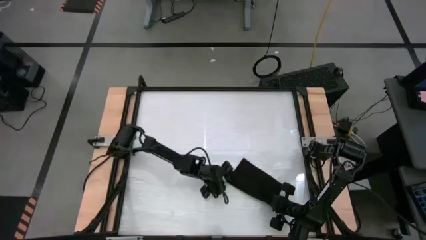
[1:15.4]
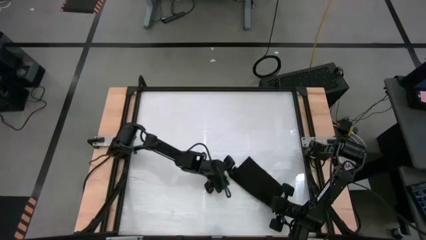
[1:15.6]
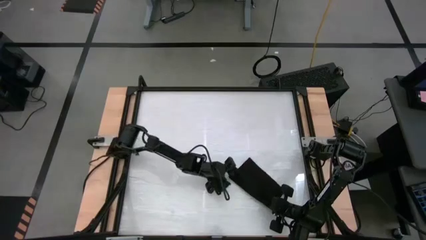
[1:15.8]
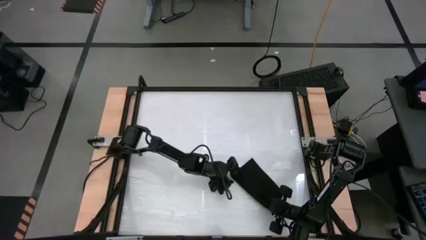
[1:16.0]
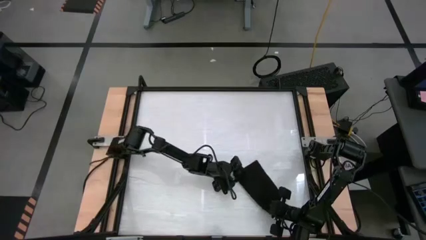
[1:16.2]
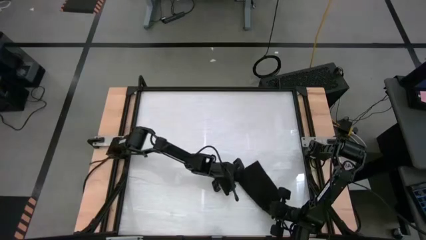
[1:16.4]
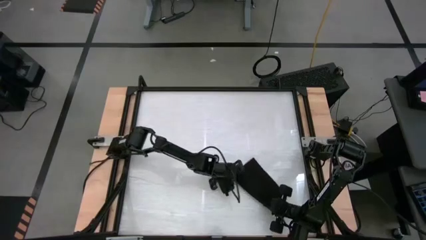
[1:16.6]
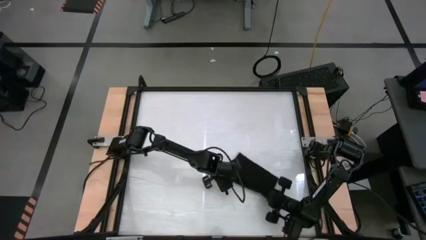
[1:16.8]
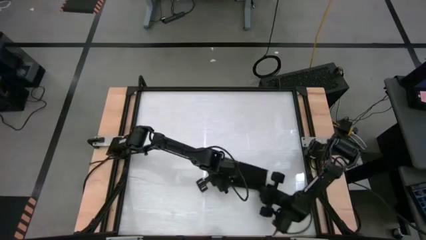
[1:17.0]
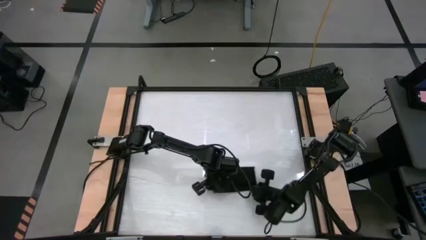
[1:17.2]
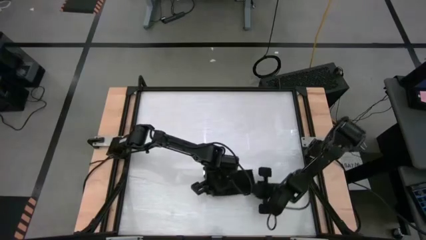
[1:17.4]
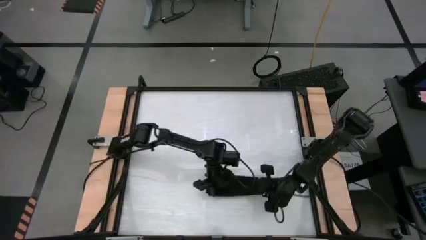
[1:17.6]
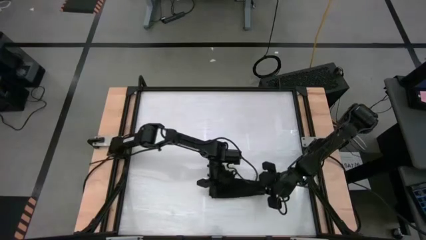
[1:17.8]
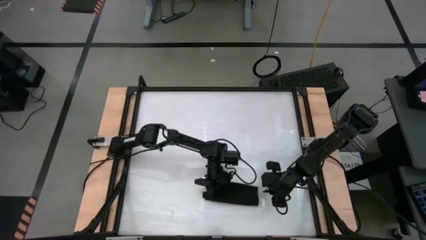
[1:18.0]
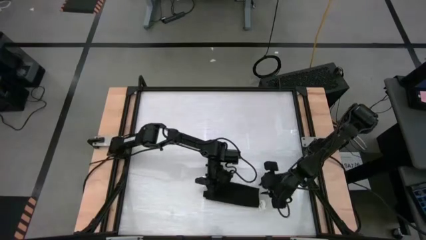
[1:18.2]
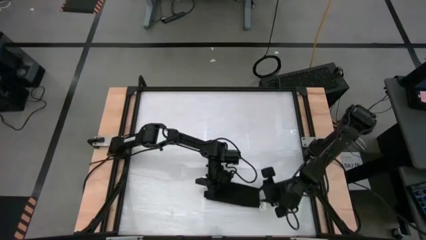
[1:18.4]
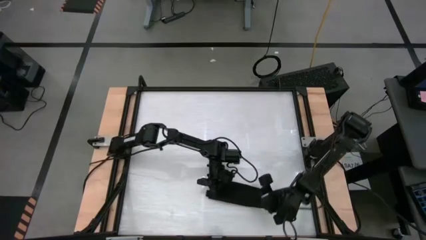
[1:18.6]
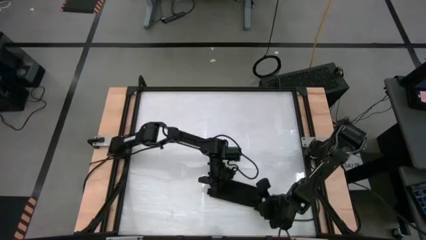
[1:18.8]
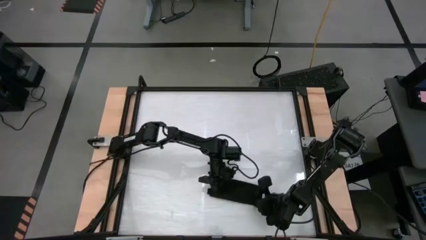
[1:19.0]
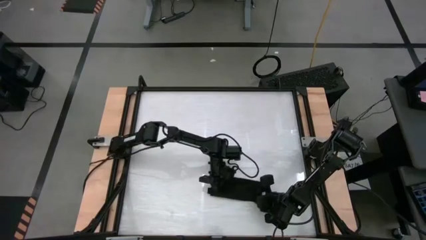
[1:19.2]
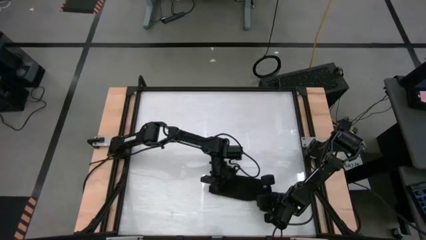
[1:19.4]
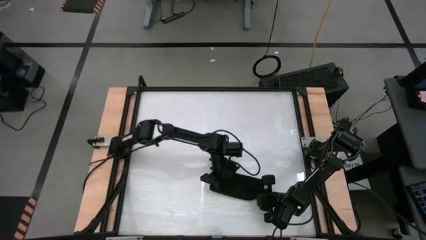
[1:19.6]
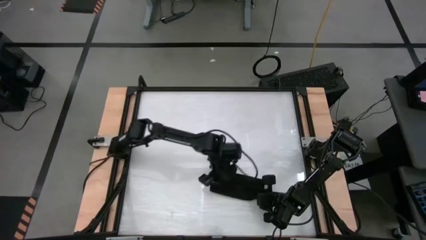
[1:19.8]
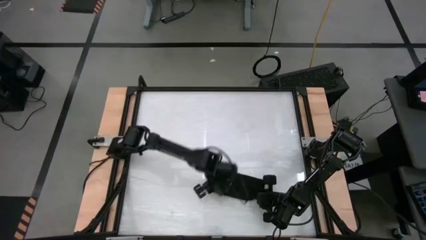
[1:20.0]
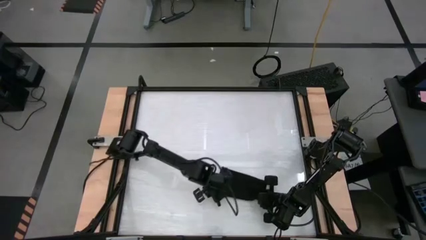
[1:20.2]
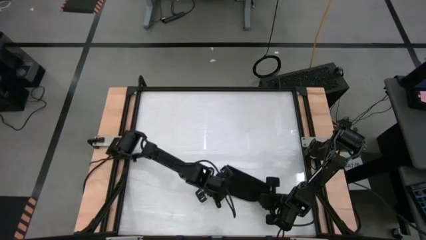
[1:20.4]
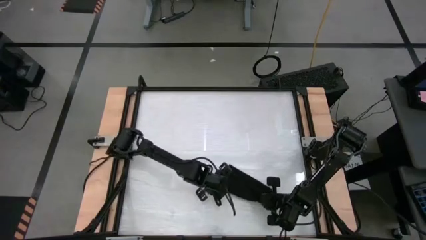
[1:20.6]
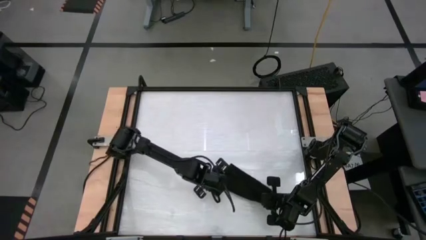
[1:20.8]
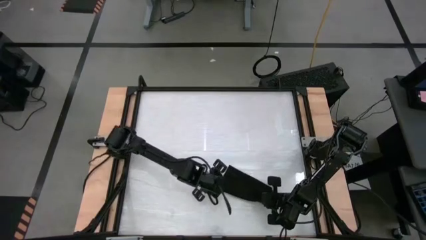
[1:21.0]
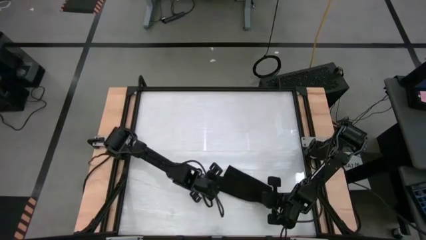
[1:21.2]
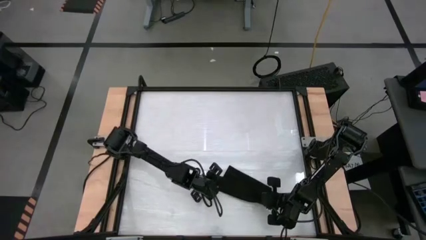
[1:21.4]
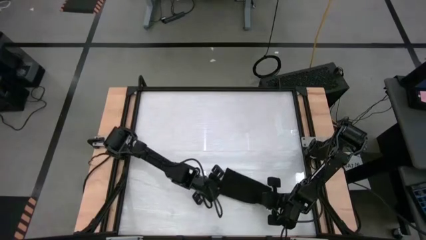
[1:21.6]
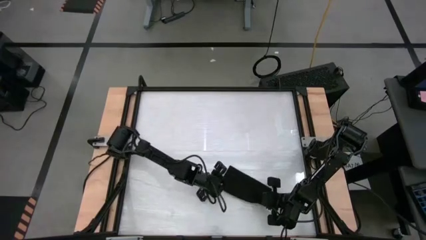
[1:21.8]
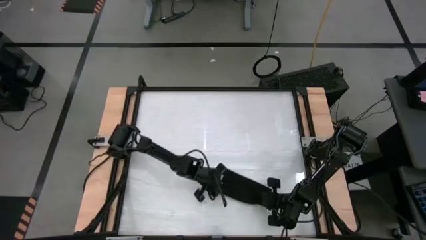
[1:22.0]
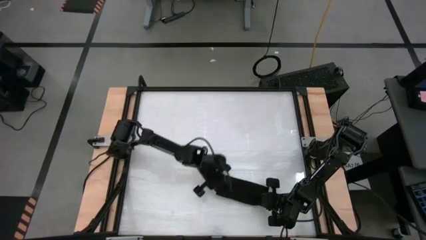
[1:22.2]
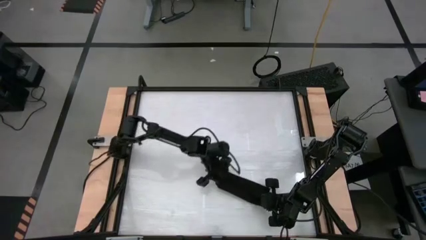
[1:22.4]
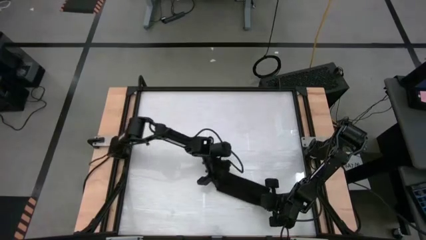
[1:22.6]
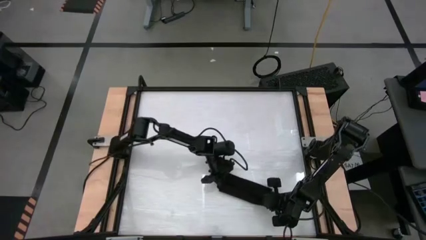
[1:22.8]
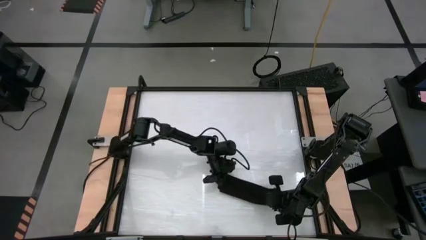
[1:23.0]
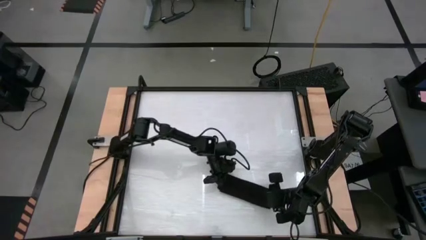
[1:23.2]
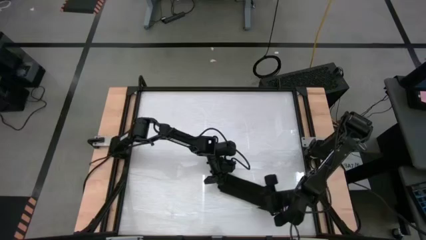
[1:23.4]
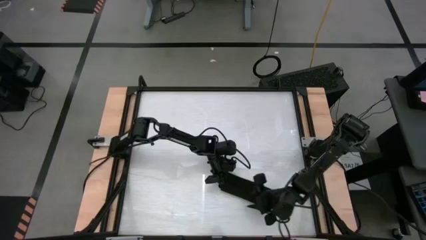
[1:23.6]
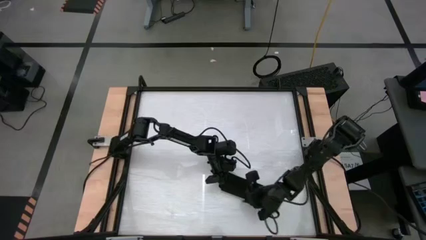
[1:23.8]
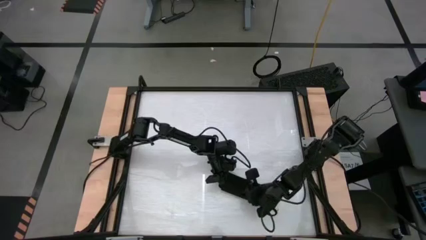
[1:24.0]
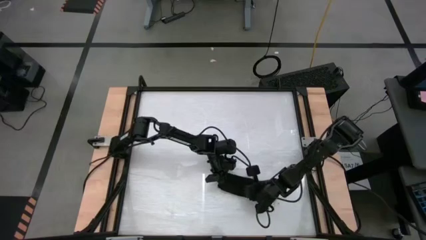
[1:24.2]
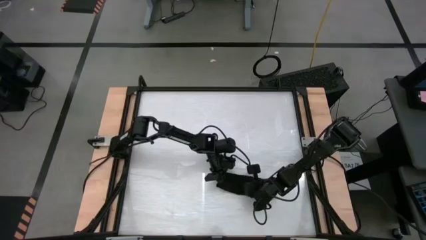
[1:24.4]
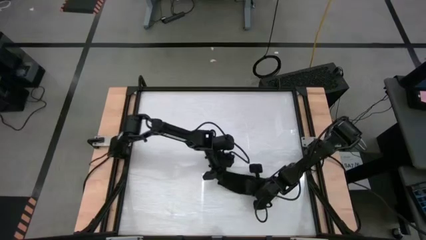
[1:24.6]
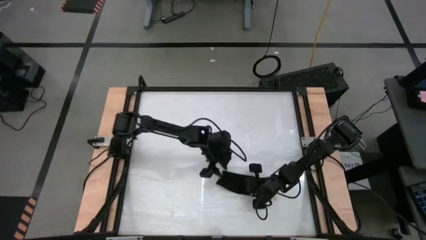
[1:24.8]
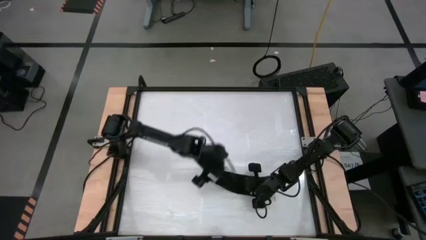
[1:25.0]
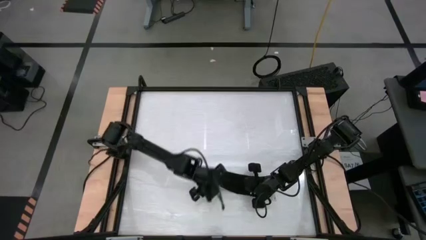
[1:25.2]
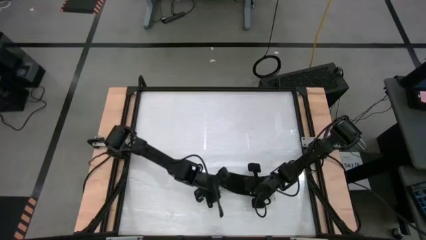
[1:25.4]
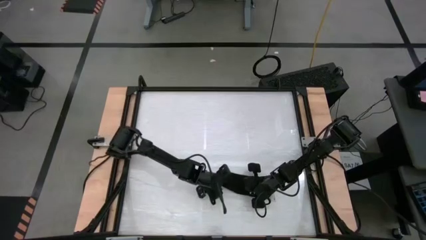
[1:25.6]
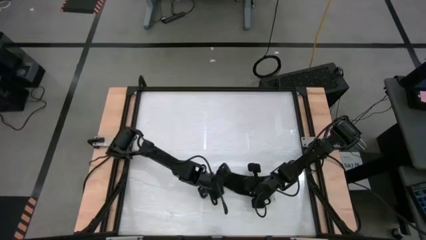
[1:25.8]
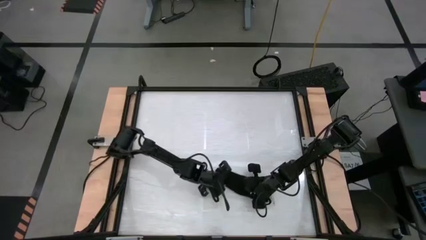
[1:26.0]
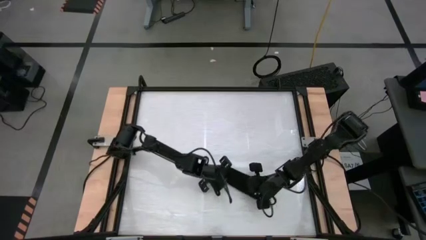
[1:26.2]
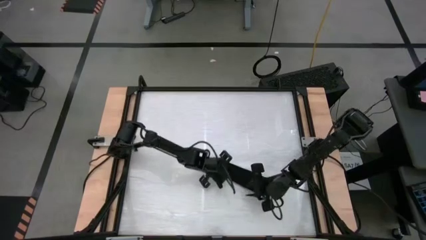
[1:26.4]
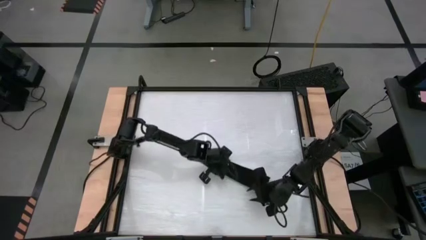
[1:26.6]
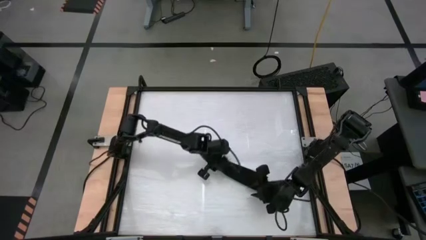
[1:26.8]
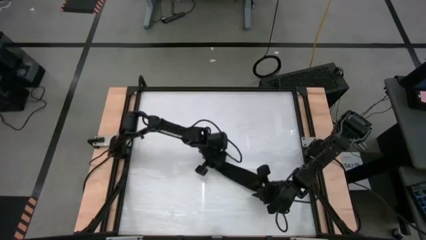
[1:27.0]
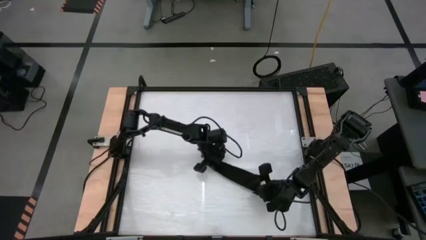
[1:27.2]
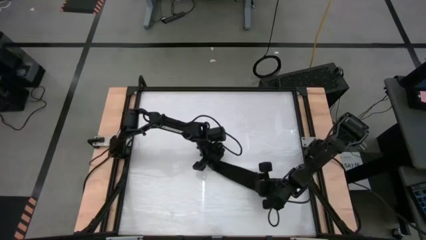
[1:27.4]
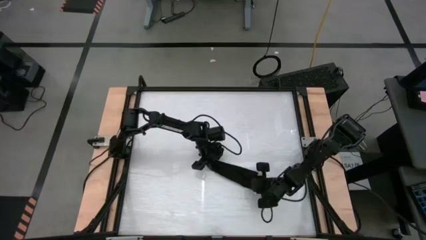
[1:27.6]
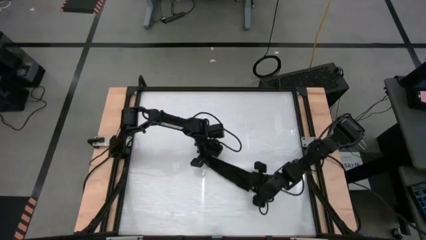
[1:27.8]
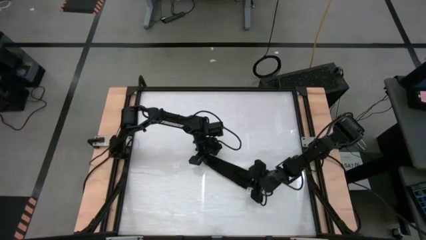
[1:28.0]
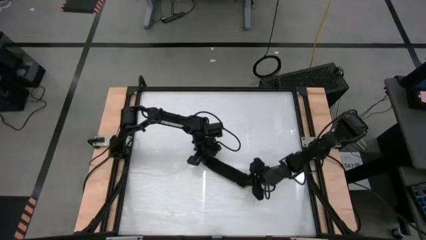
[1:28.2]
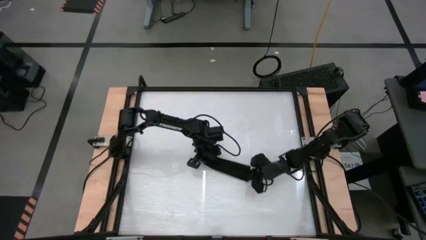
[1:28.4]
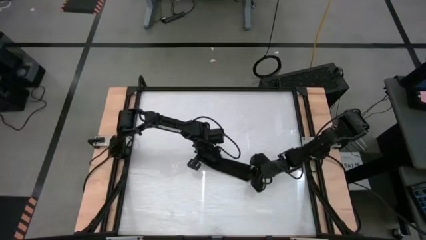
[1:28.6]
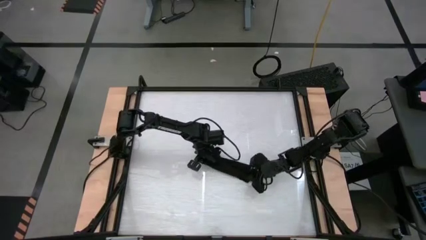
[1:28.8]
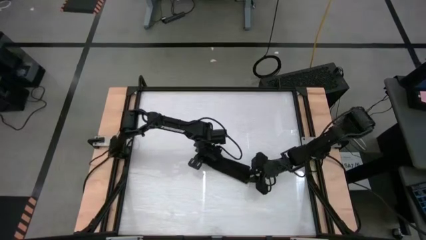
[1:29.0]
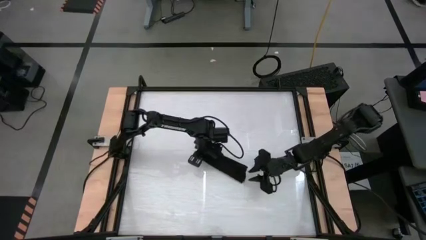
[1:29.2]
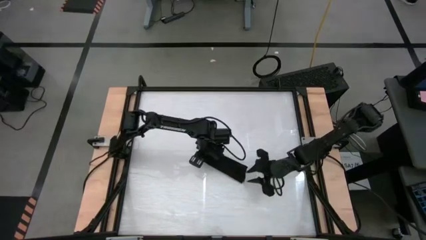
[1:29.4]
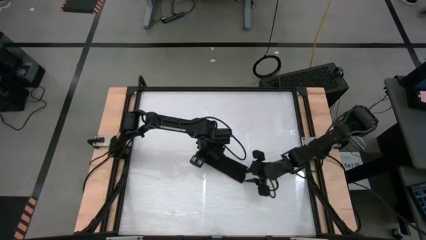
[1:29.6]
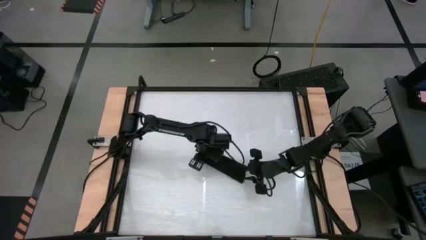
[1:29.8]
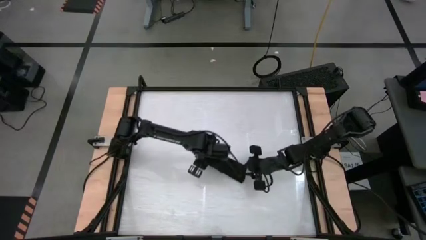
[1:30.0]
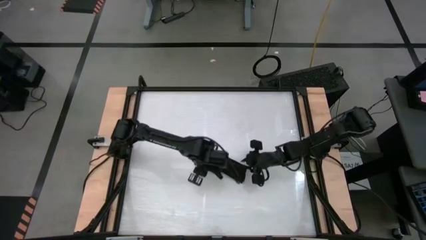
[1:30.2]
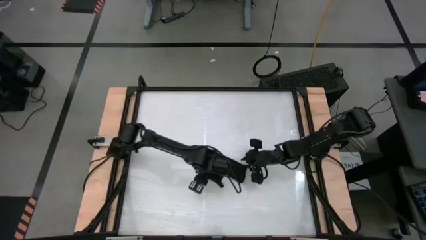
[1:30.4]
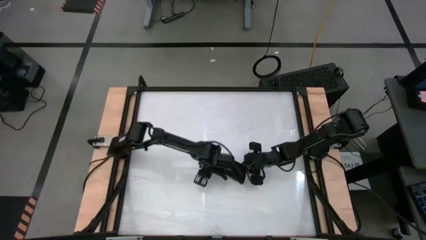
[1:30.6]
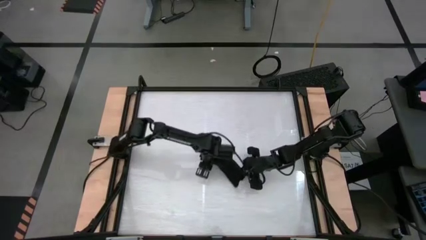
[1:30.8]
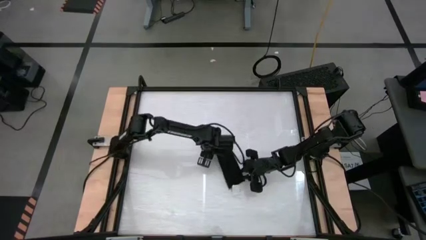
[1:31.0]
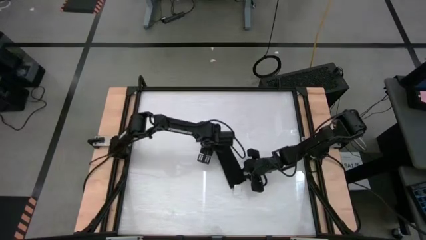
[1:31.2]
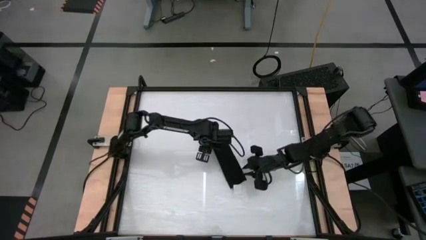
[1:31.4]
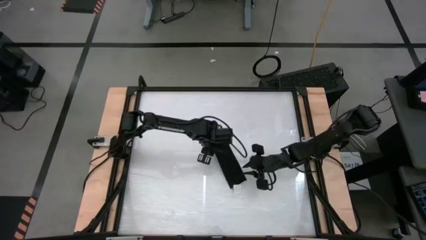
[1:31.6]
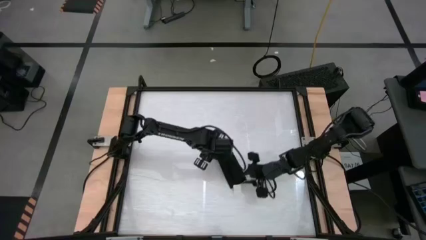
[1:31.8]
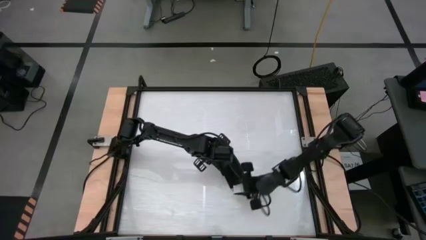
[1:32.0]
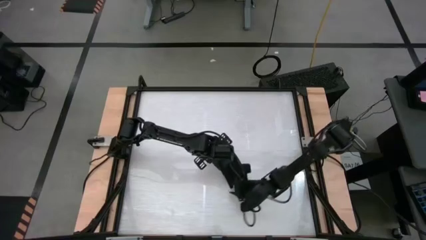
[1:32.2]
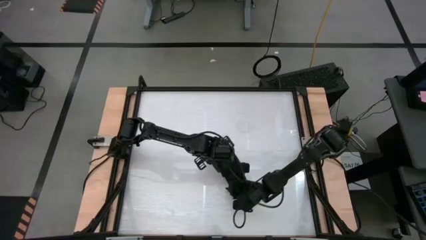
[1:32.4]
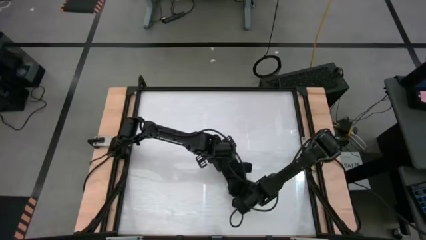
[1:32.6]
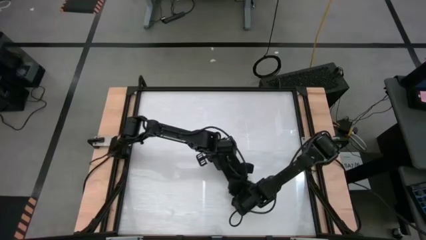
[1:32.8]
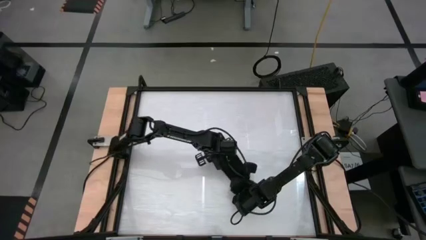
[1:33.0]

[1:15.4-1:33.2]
Task: Roll towel
Roll the black towel
